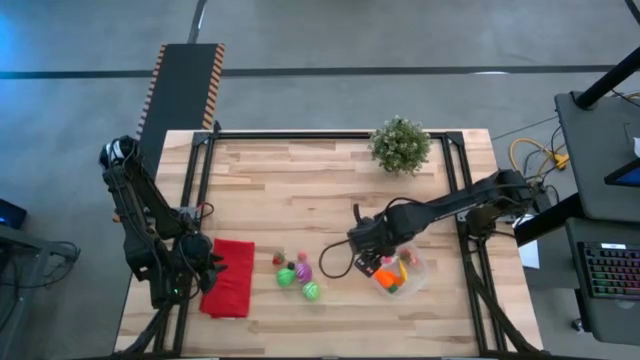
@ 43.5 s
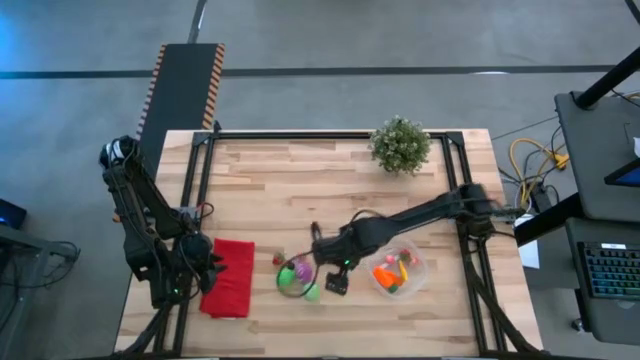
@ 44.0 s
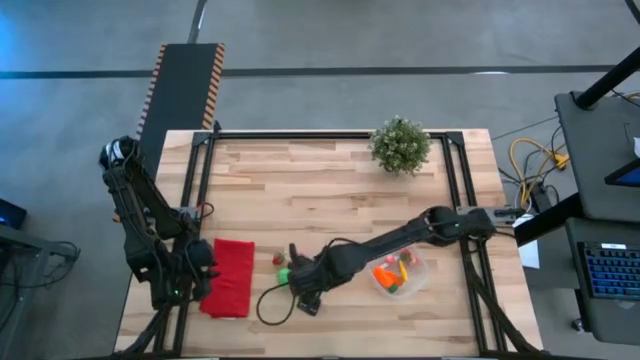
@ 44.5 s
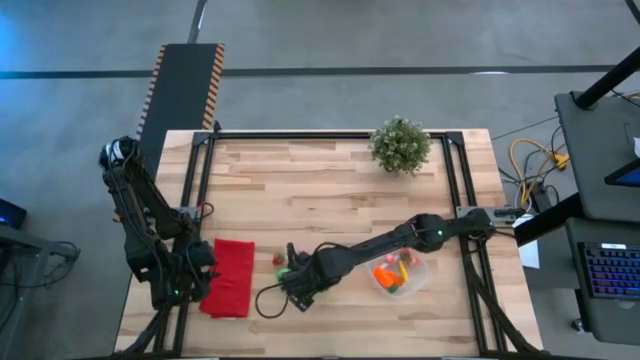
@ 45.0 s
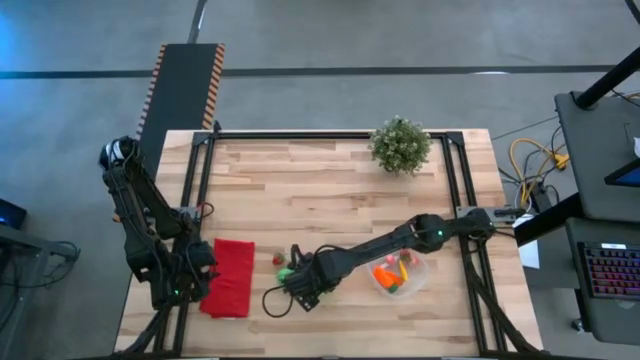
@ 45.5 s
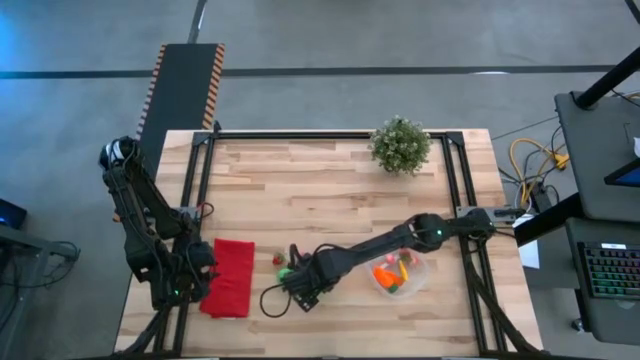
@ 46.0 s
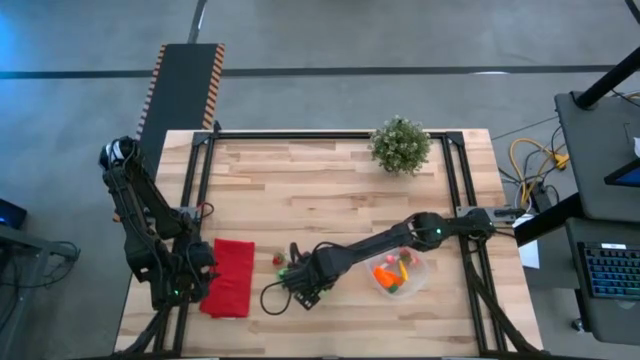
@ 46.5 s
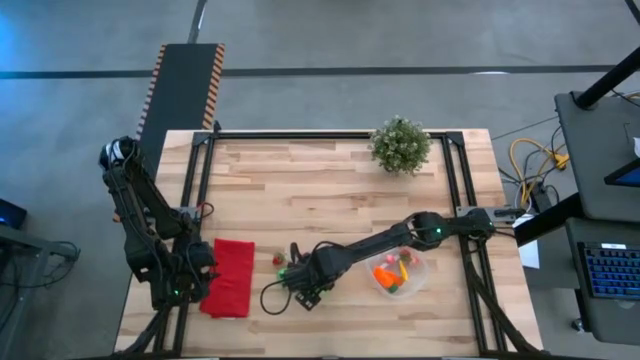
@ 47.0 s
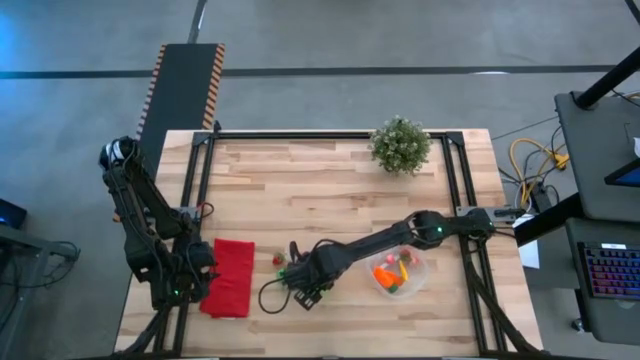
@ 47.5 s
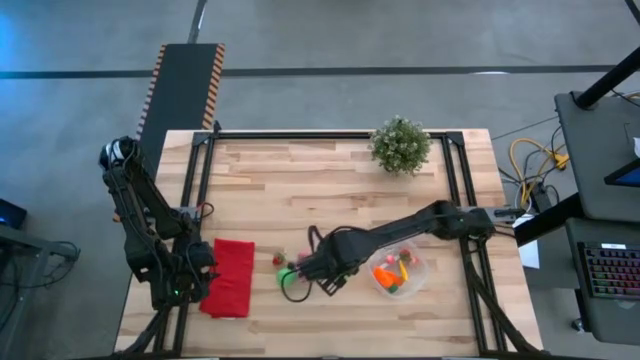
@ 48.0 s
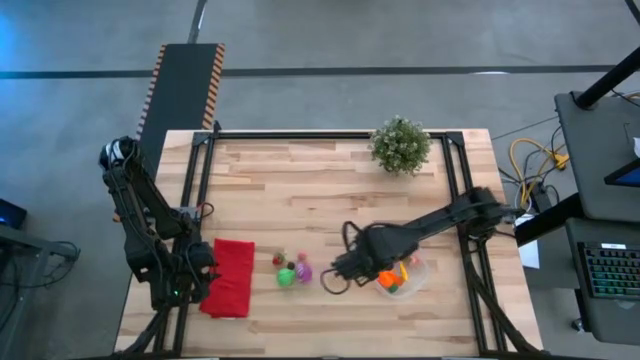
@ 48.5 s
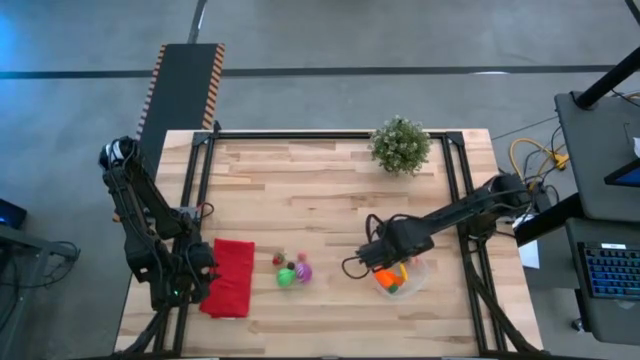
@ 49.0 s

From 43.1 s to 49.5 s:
Task: Pick and placing Produce into tupperware
Put the green cabbage into the transparent bin

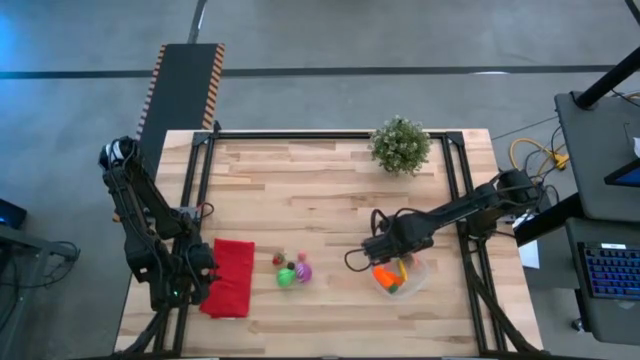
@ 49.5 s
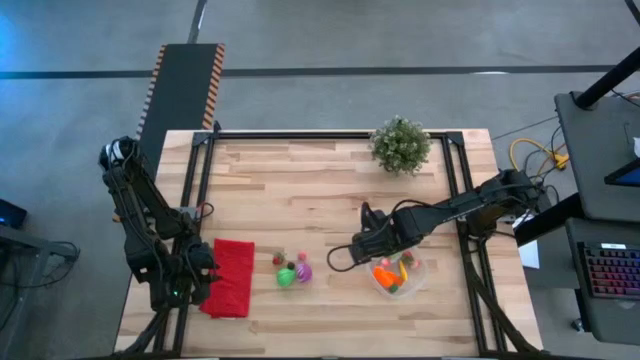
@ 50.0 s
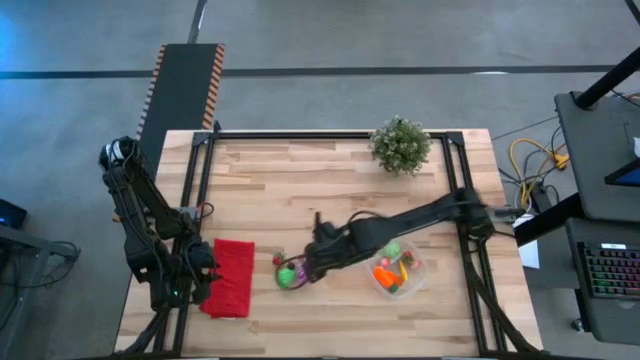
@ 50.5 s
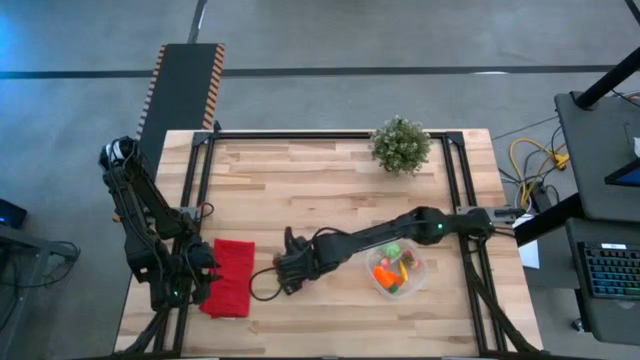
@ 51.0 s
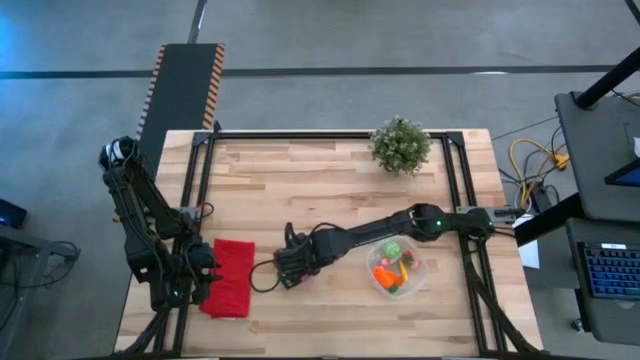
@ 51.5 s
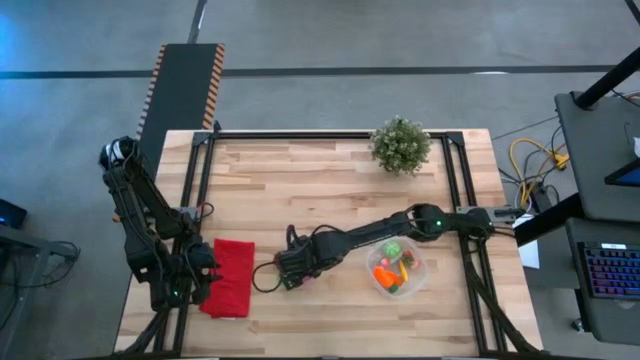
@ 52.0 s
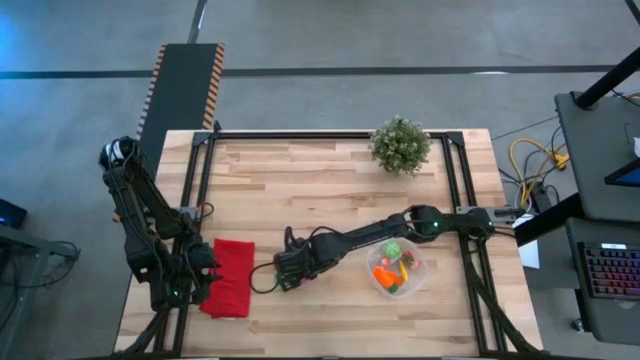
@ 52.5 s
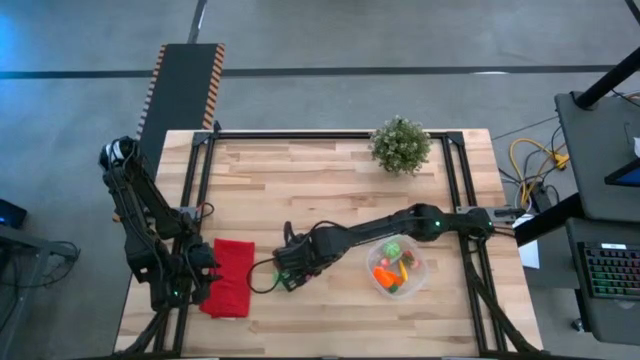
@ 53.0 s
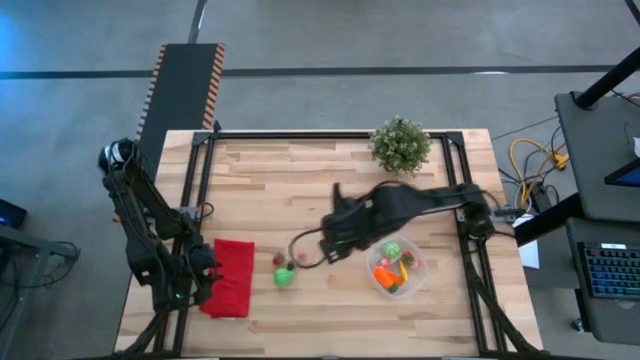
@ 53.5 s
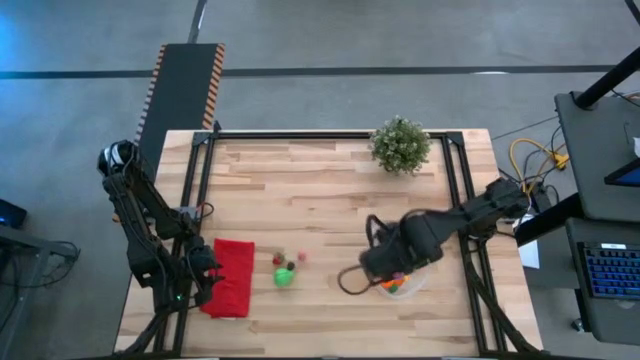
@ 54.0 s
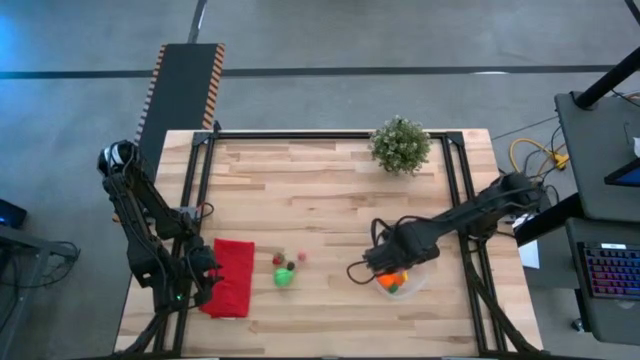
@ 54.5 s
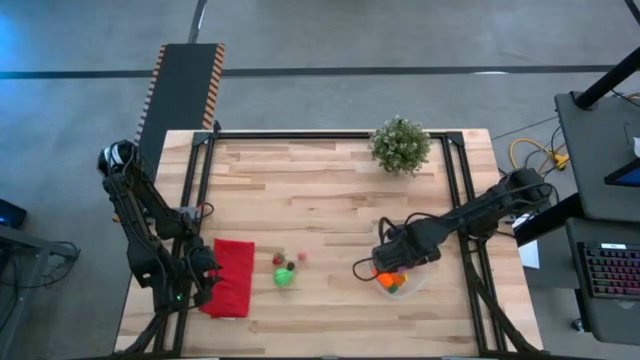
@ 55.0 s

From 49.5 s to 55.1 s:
Put the purple onion into the transparent bin

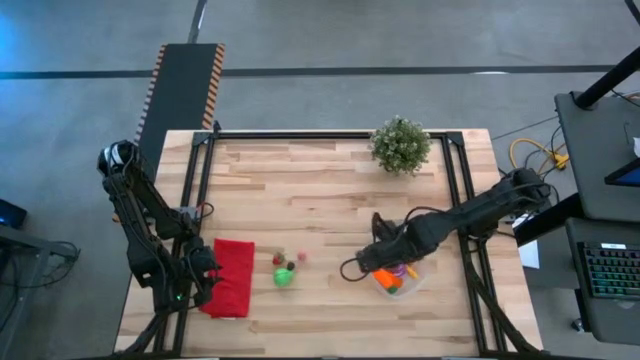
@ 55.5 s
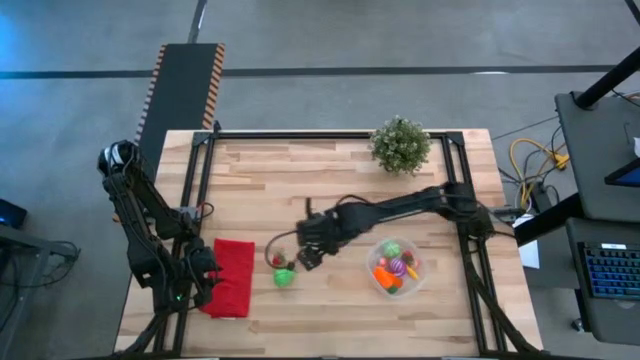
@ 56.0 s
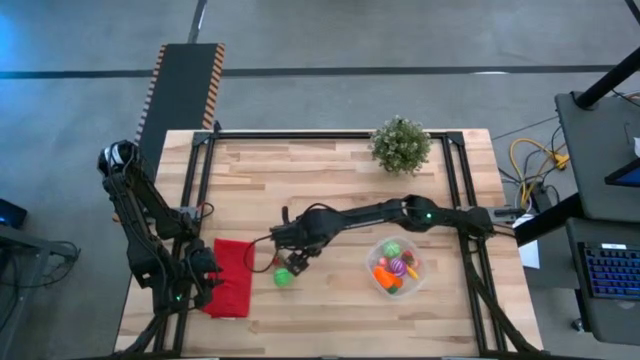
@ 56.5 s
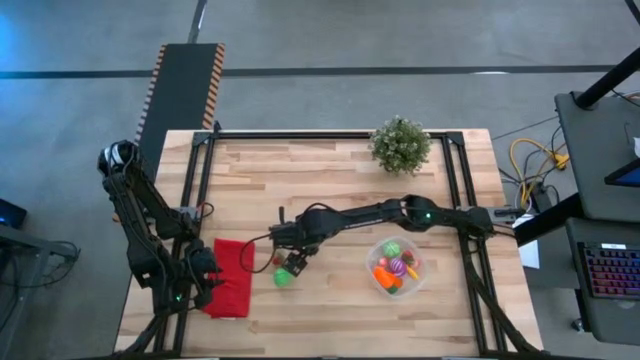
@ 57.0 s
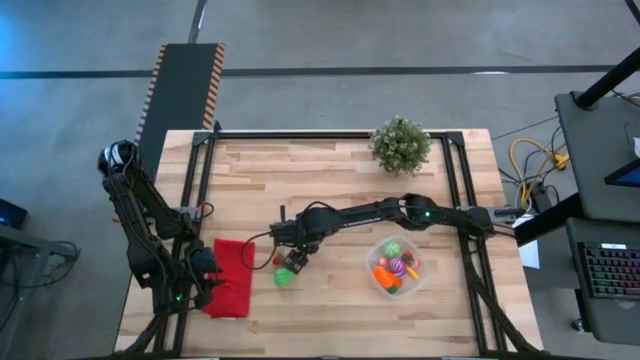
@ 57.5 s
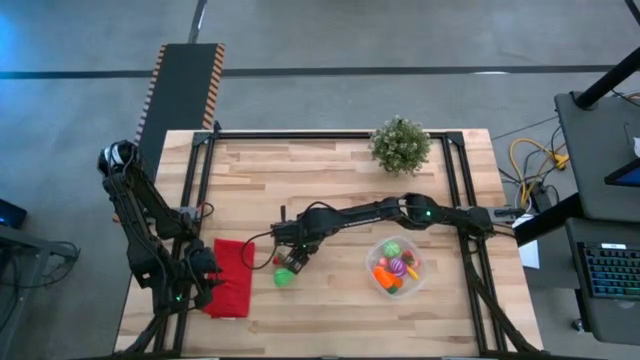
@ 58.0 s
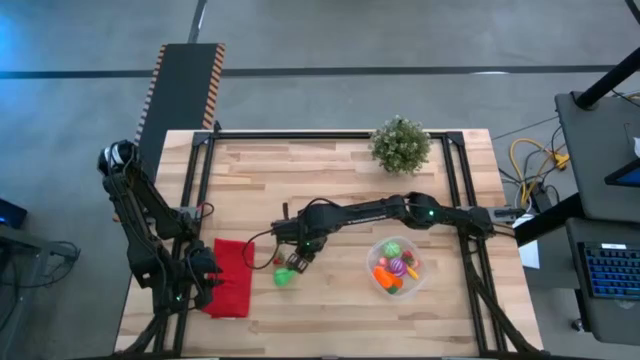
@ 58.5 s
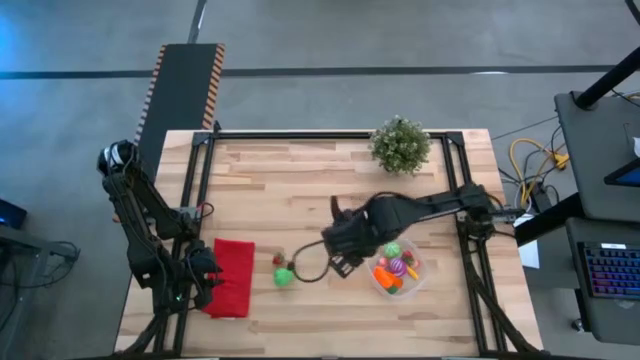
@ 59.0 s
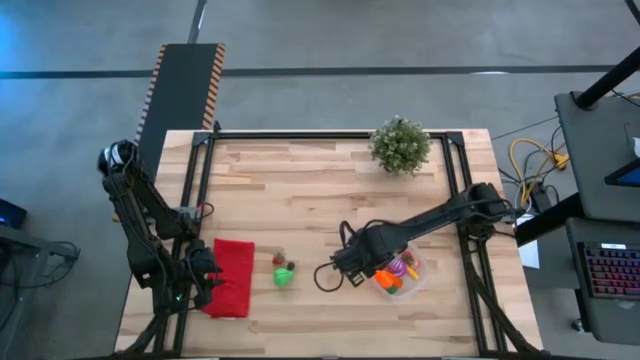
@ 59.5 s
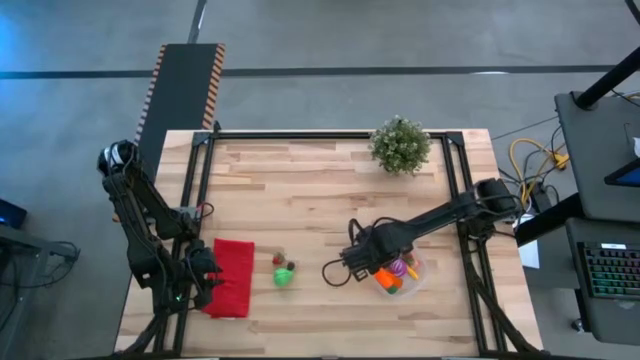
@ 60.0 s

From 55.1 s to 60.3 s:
Put the pink peach into the transparent bin

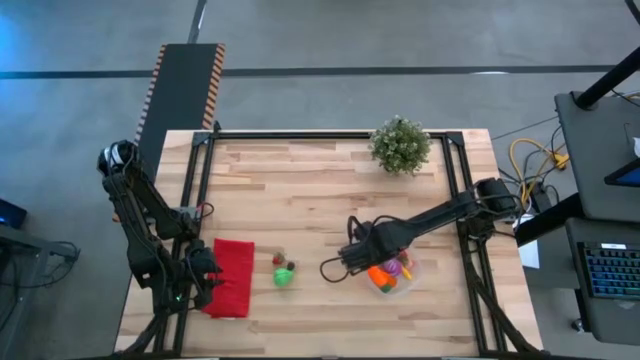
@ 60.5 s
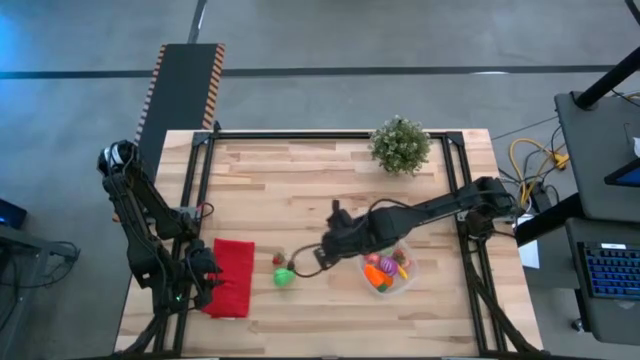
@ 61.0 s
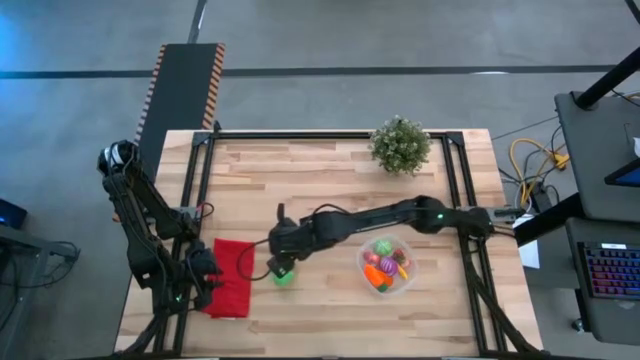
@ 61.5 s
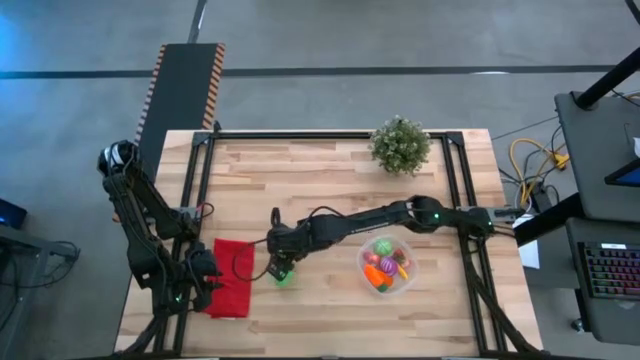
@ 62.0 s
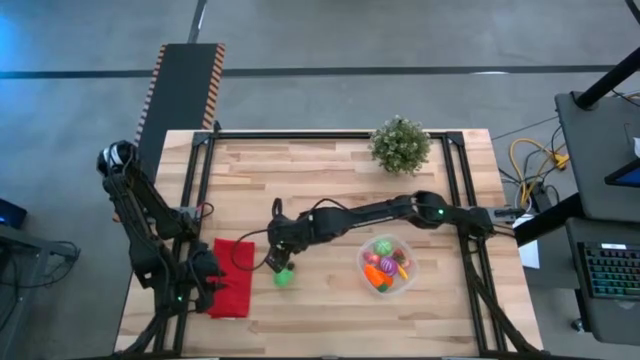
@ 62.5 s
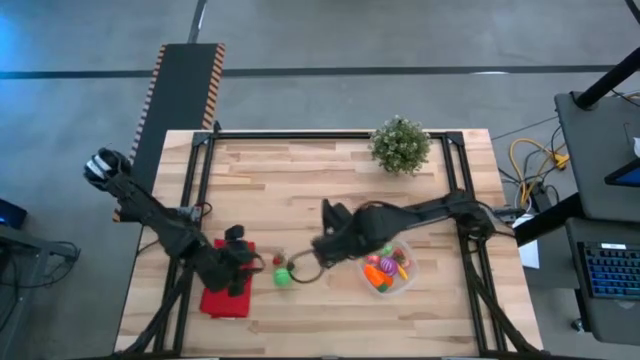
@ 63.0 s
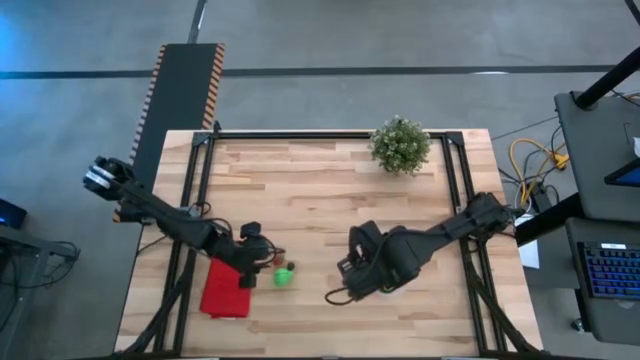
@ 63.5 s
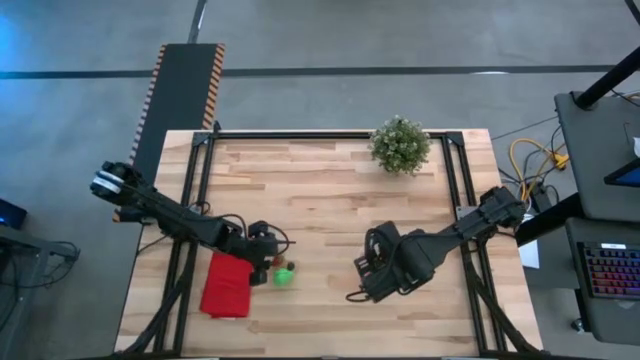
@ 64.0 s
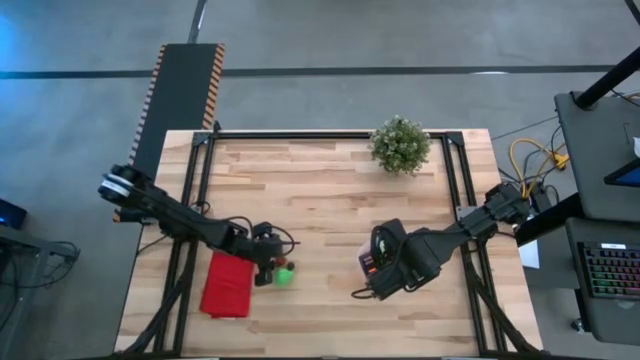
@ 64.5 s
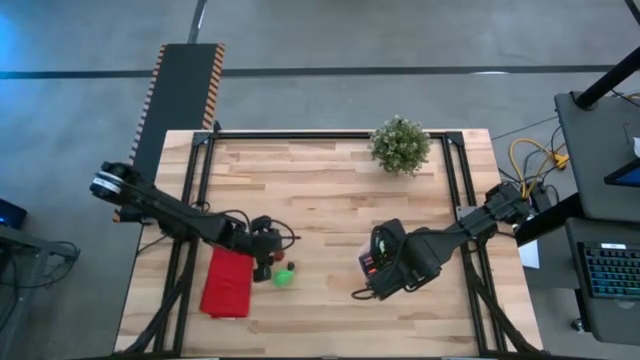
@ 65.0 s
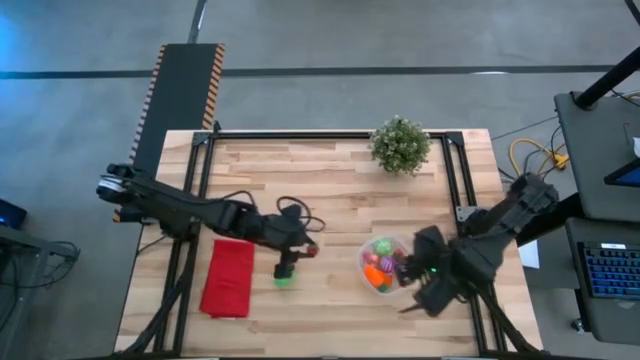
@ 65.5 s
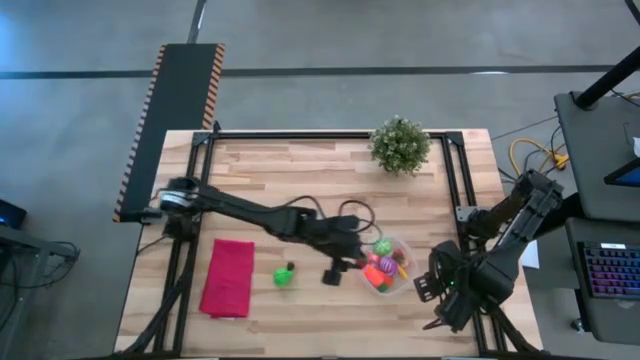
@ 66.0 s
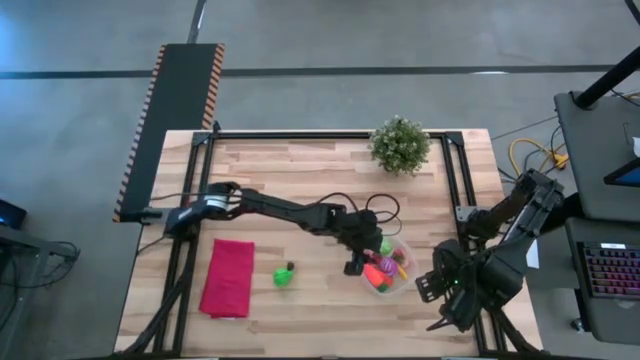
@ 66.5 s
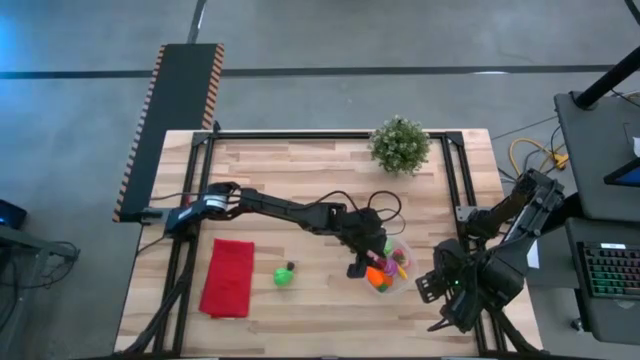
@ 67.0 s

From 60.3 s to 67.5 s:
Put the red strawberry into the transparent bin
